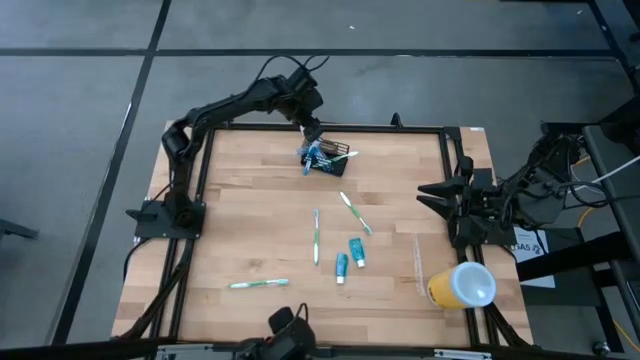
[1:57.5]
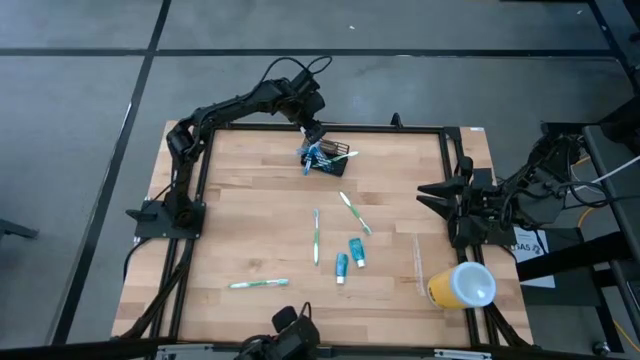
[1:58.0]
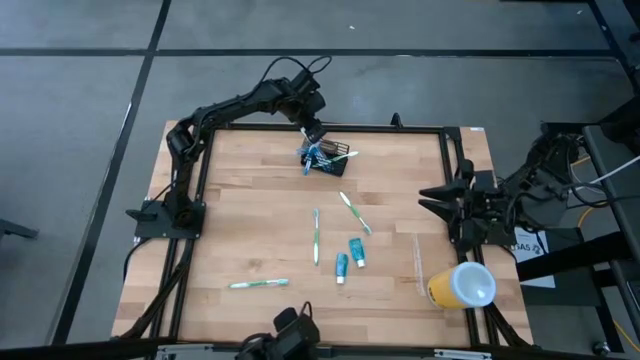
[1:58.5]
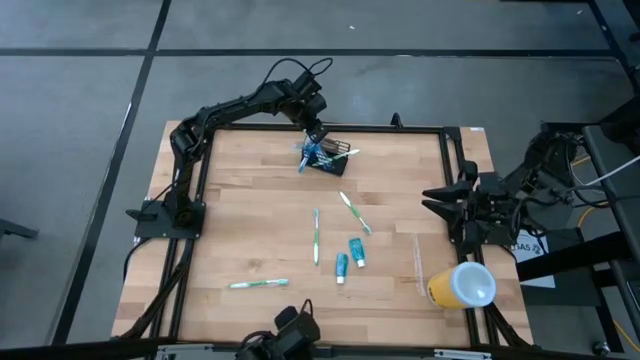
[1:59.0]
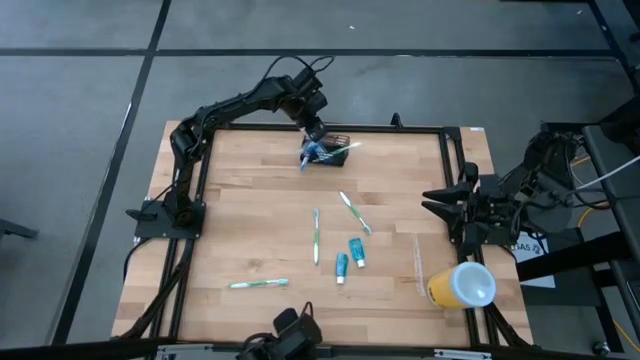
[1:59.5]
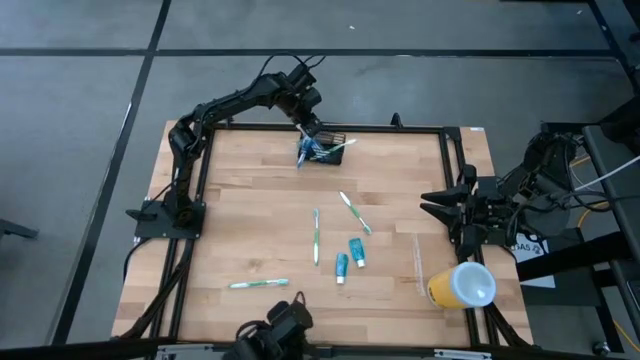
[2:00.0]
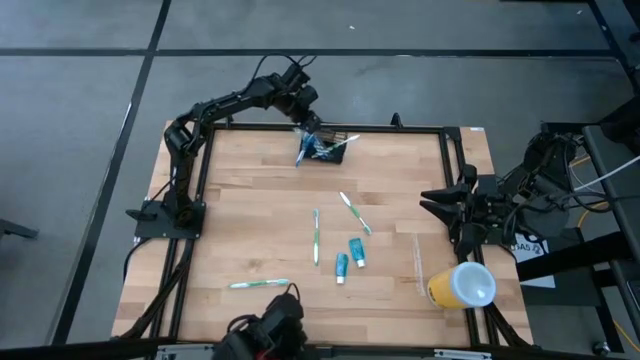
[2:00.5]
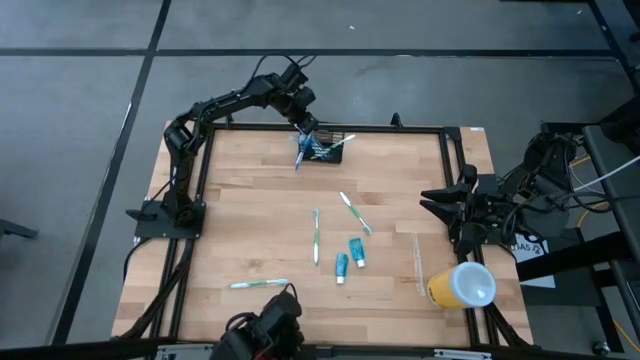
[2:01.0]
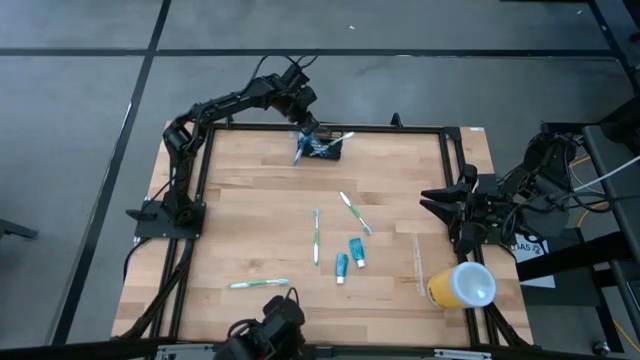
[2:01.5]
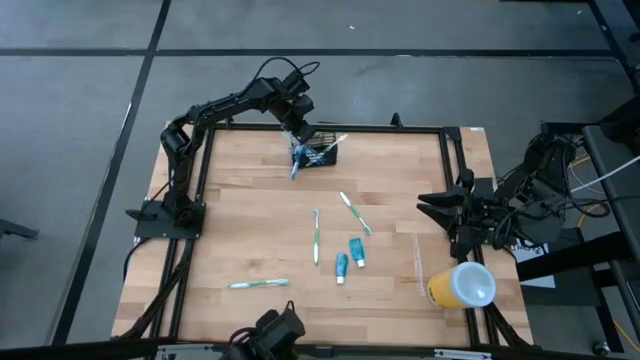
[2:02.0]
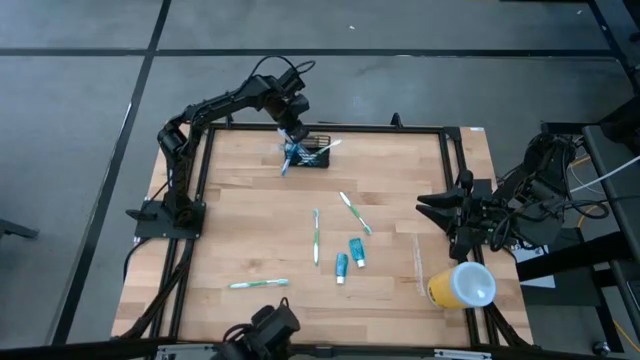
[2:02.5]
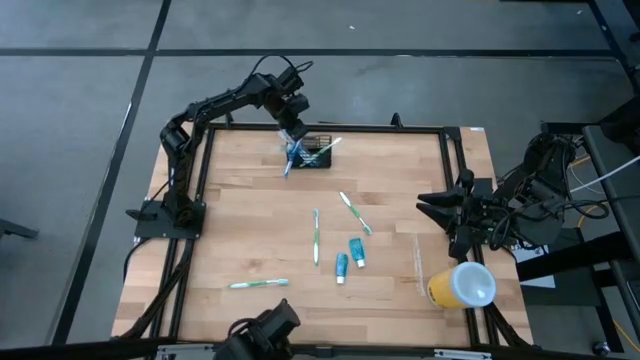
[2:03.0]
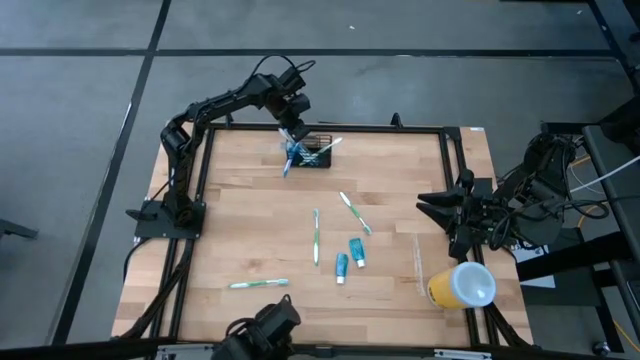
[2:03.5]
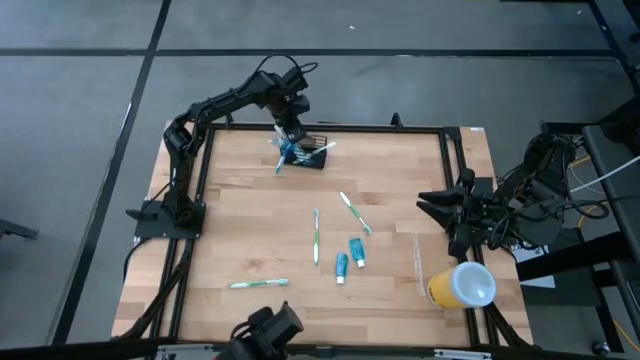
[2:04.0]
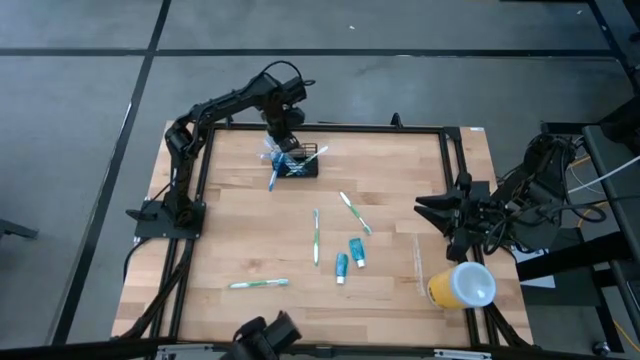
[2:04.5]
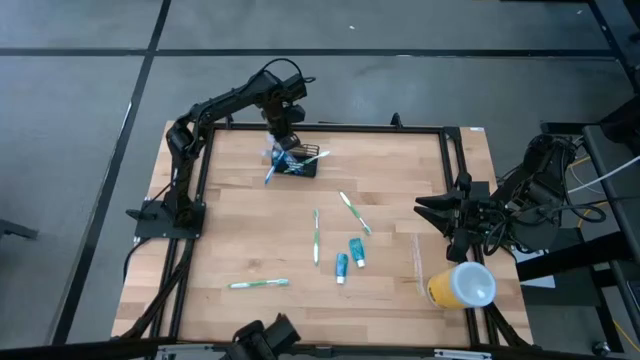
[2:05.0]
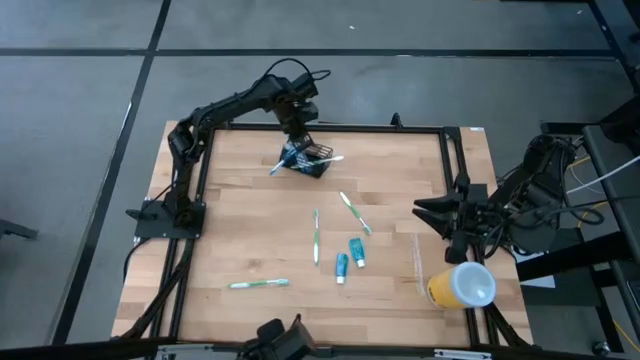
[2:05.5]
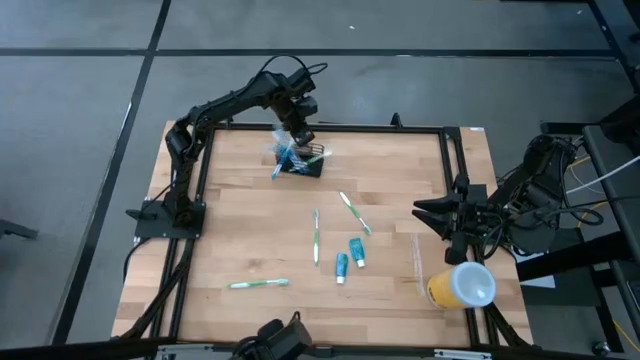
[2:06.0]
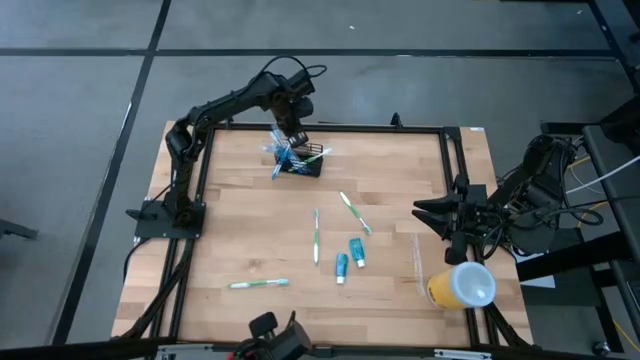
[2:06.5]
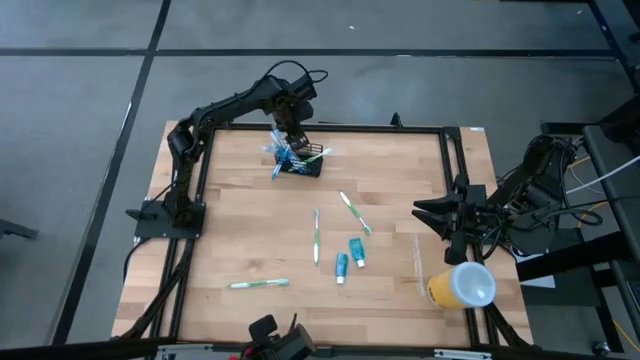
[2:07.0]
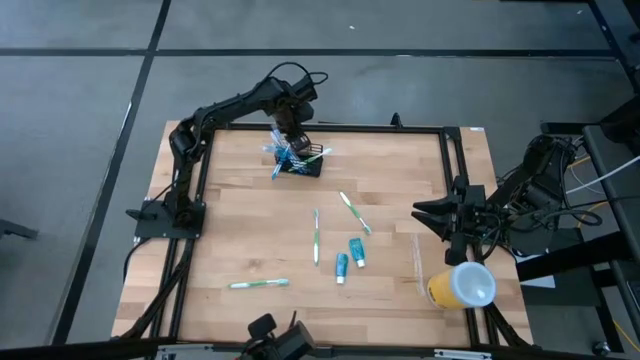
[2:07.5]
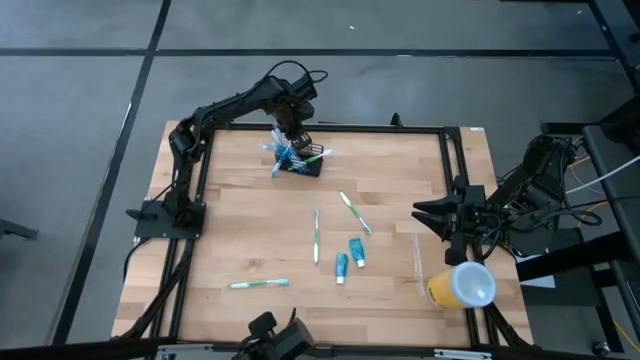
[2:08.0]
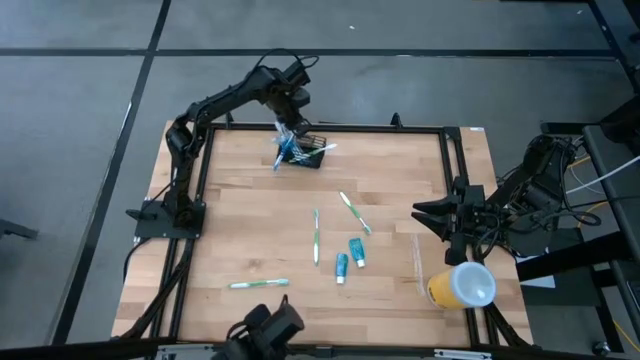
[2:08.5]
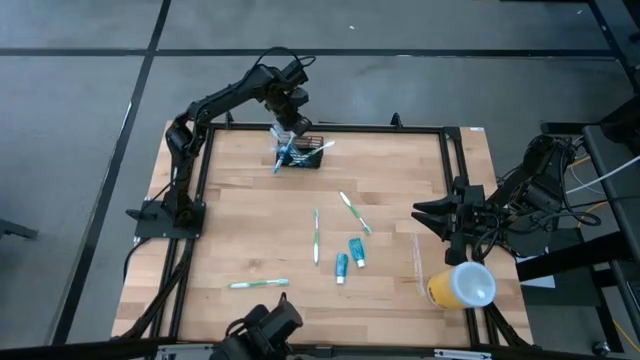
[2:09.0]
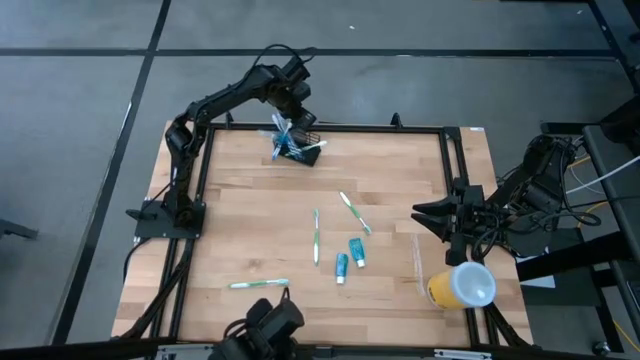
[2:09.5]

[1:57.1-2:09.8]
Task: Pick & Place toothbrushing station
Put the blue toothbrush into the wire organizer

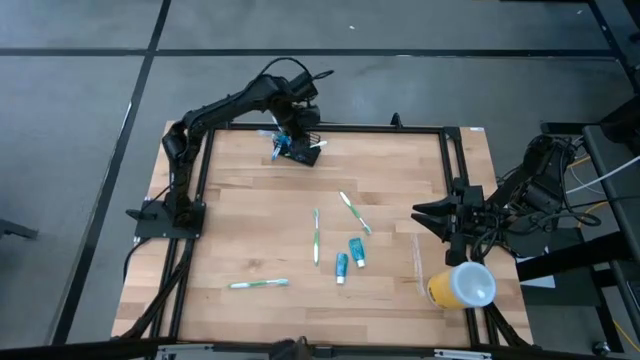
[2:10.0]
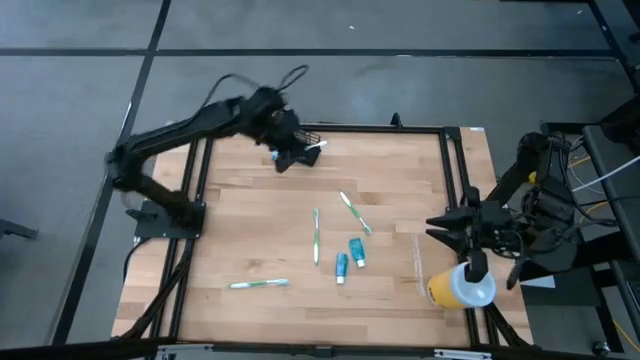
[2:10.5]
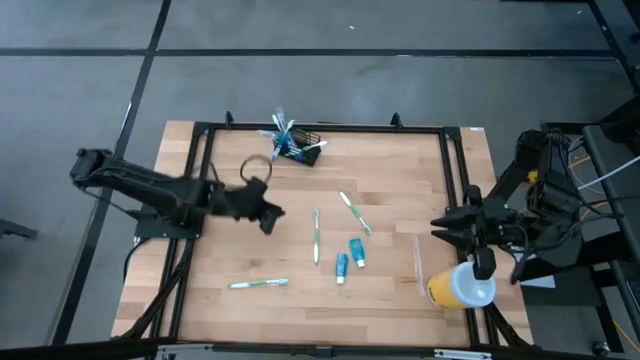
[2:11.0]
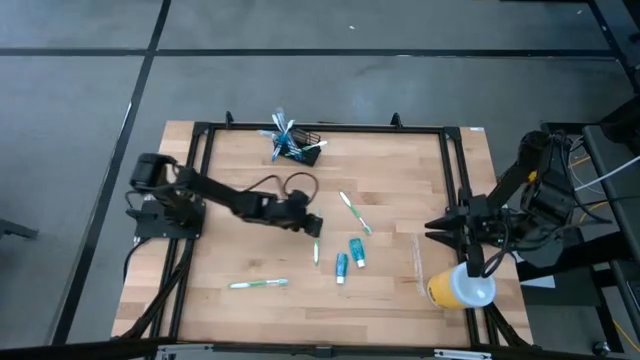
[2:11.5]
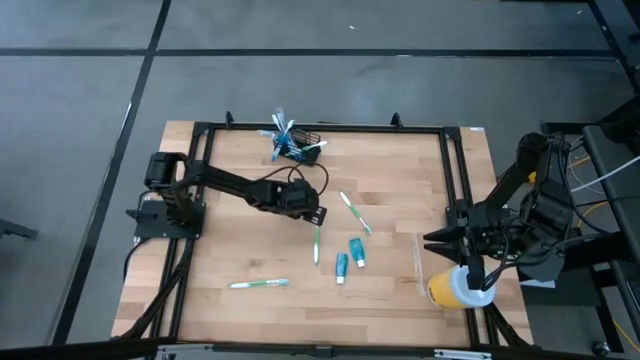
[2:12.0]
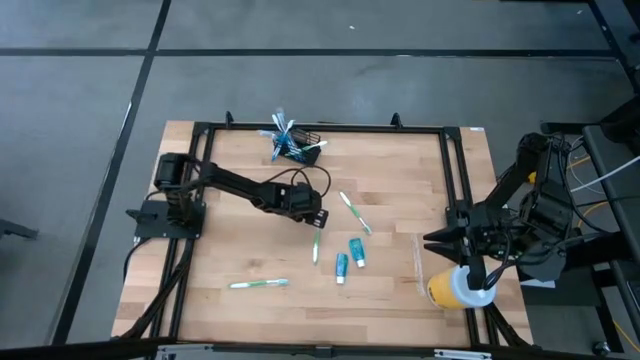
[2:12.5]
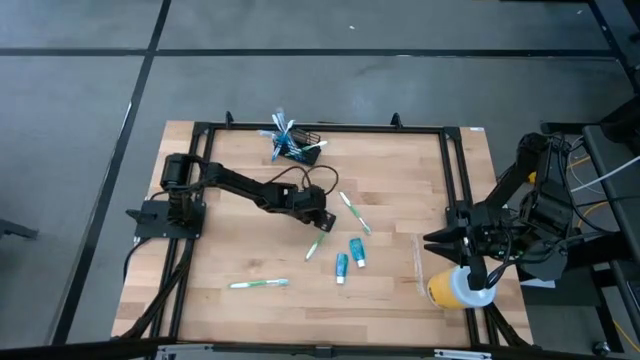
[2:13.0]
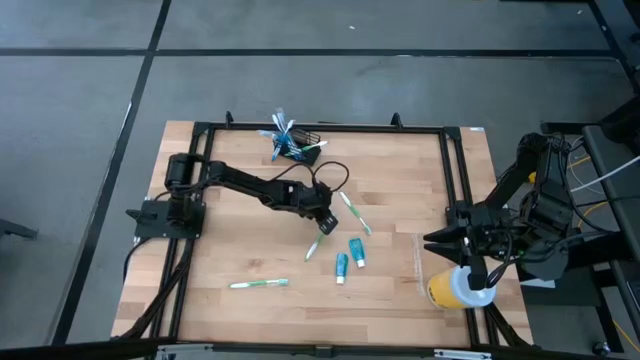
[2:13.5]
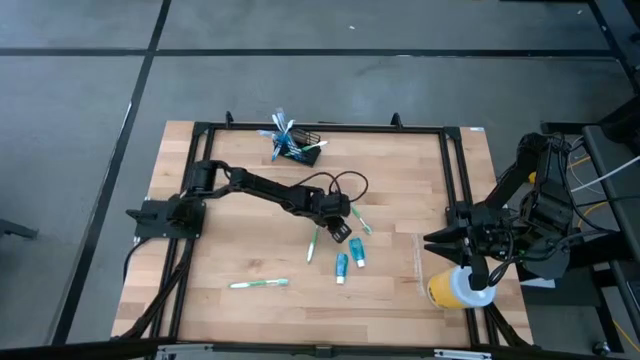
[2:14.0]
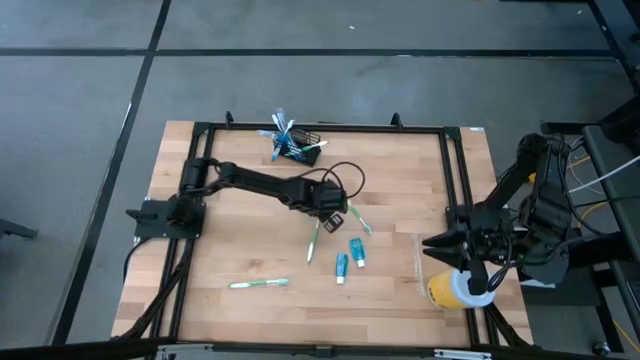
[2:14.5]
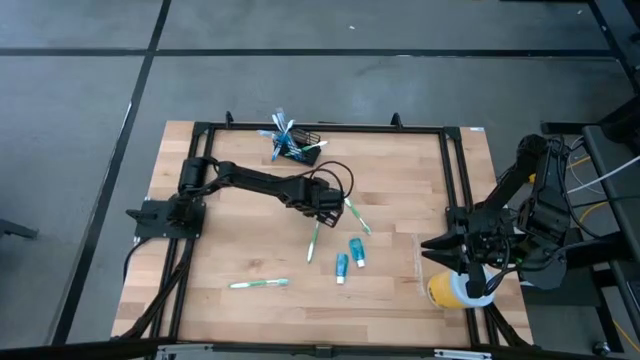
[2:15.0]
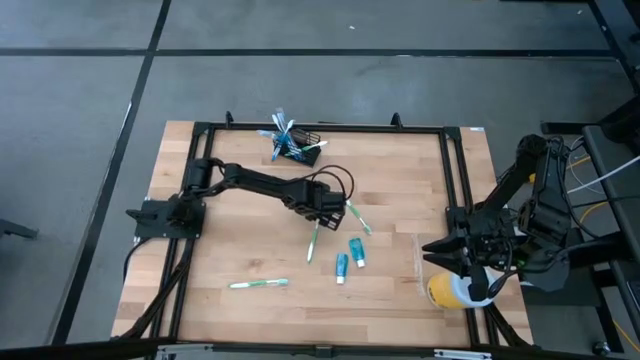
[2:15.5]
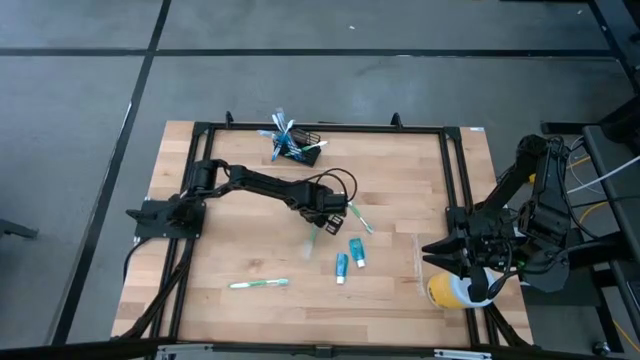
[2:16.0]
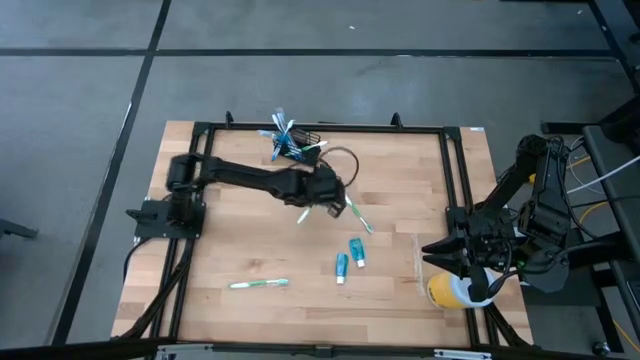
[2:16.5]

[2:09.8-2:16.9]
Put the green toothbrush into the wire organizer
